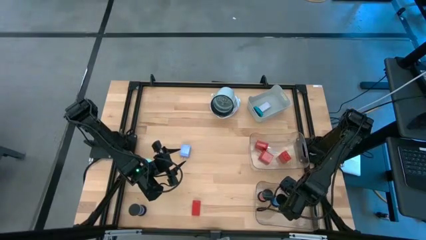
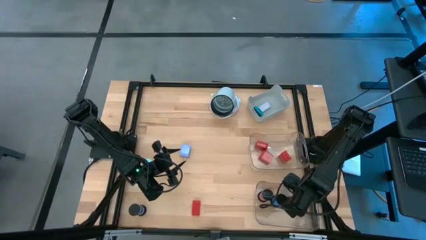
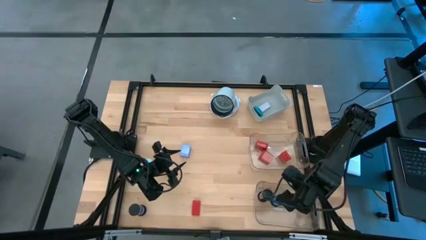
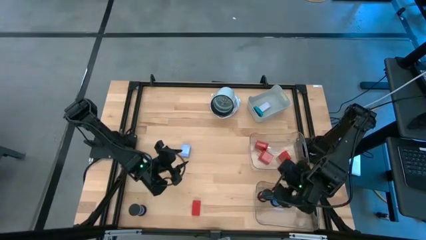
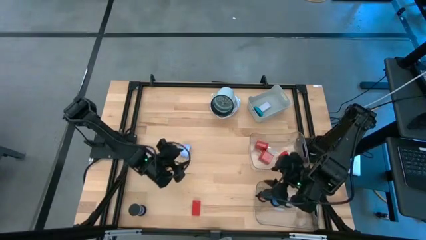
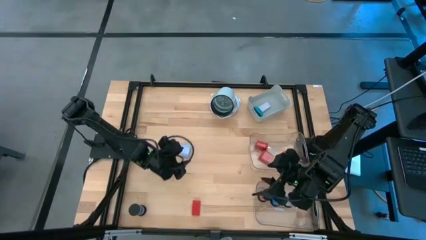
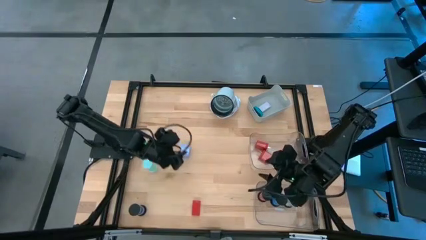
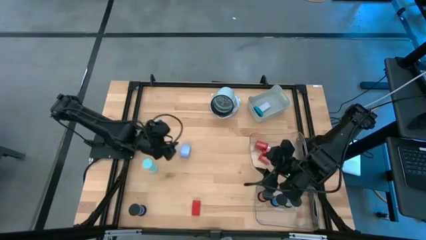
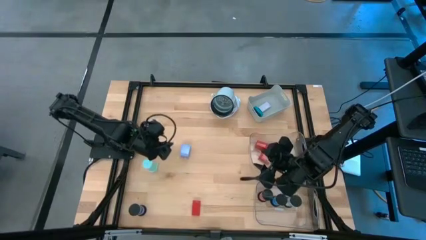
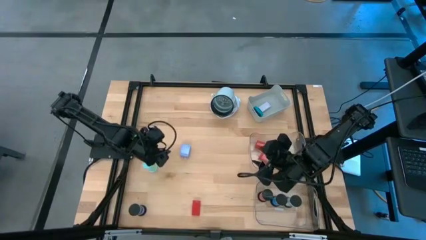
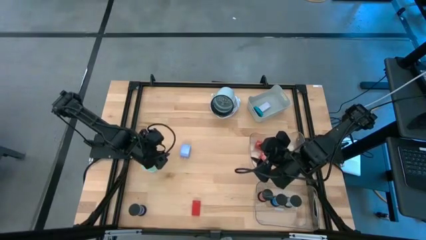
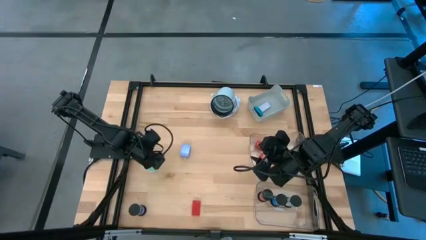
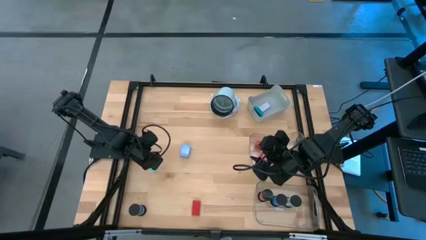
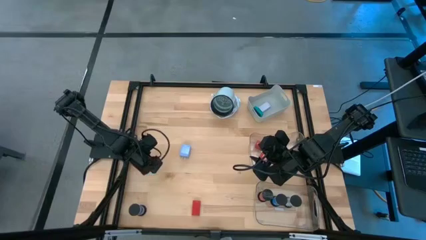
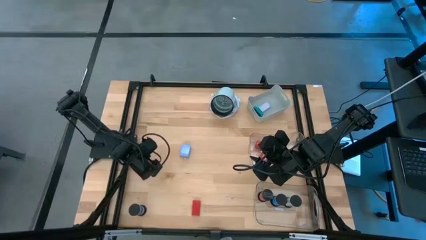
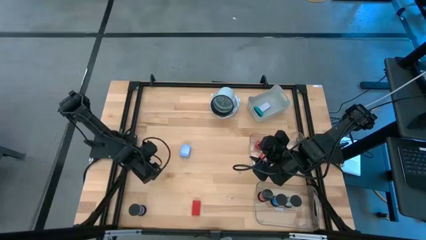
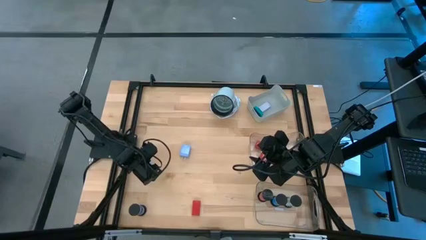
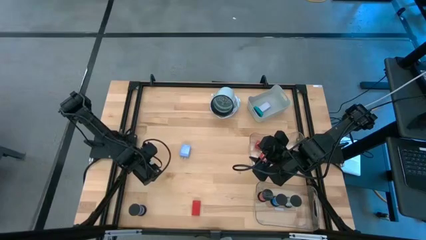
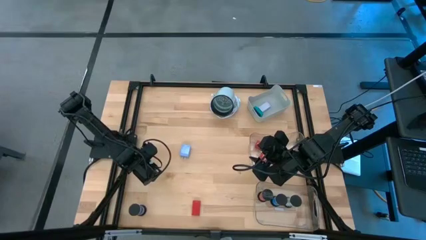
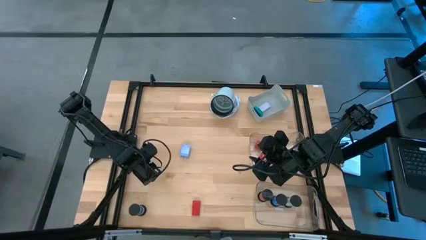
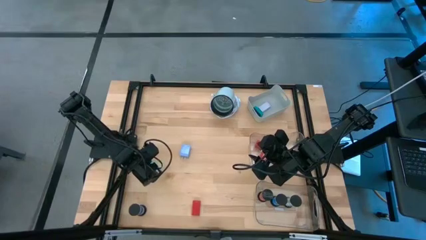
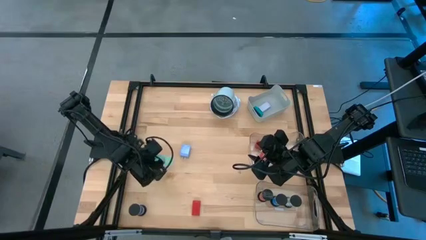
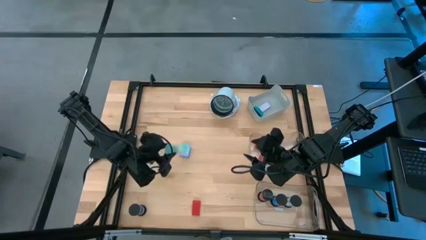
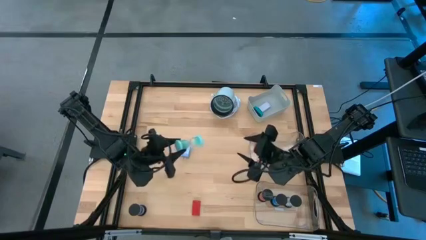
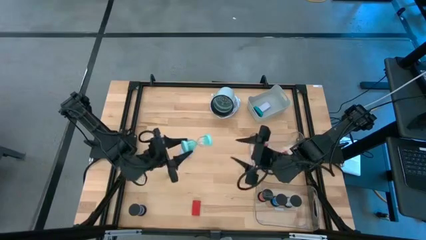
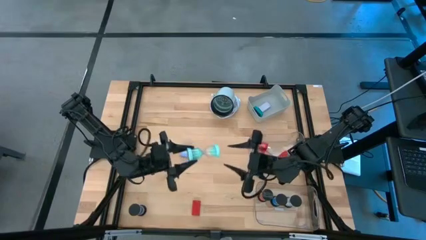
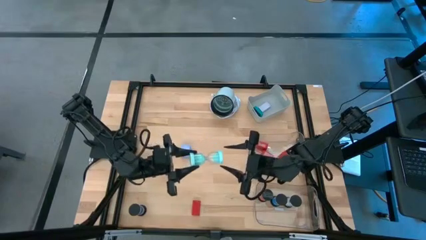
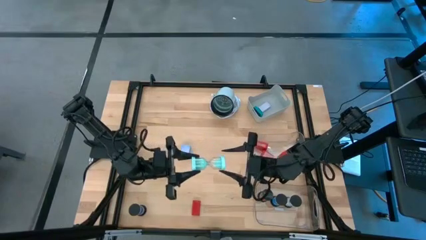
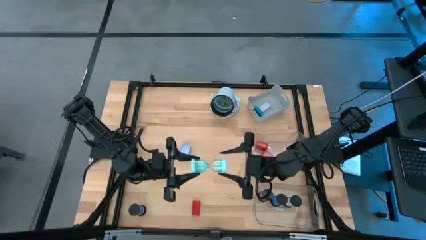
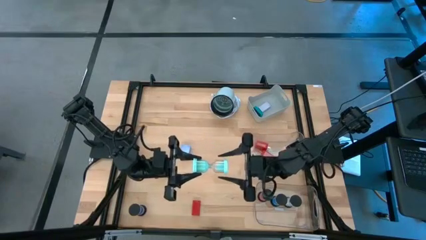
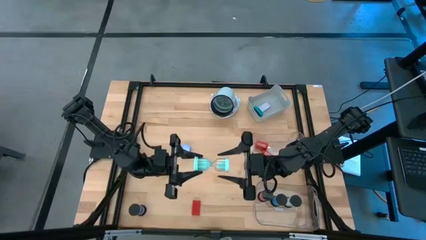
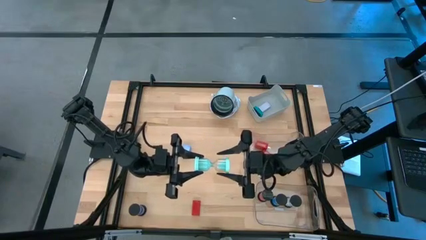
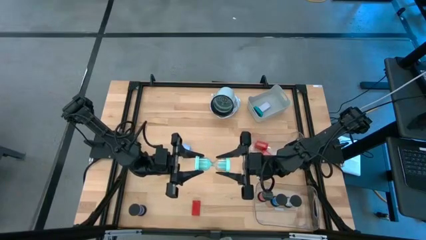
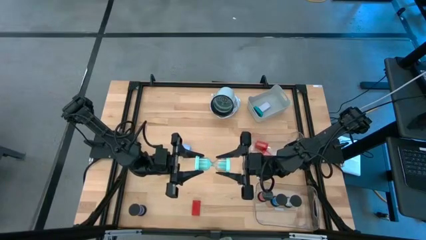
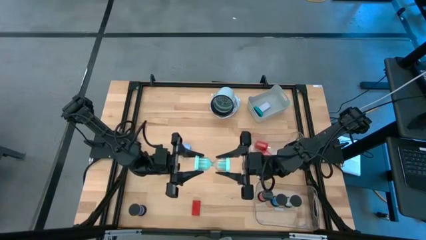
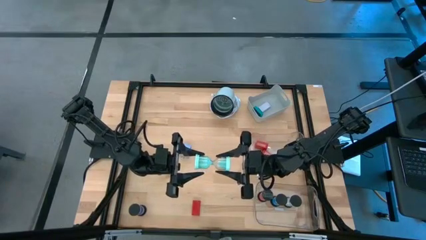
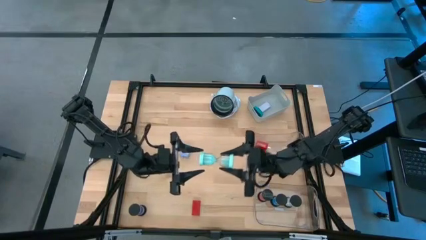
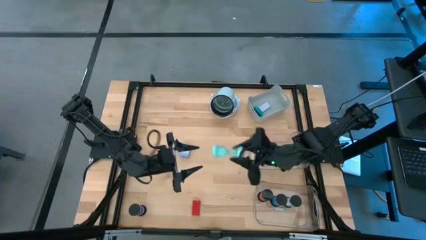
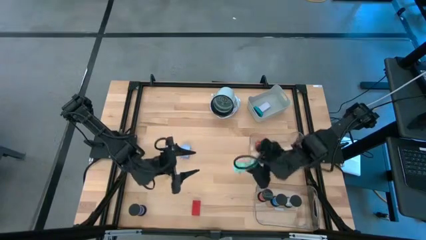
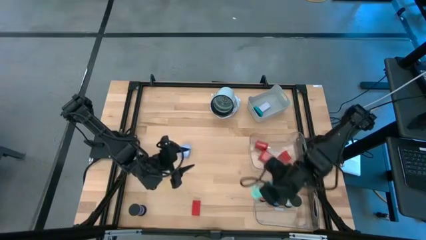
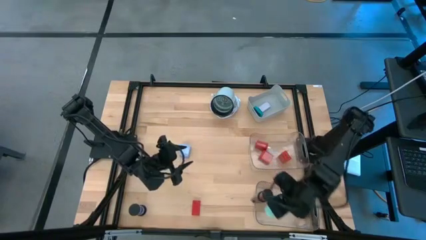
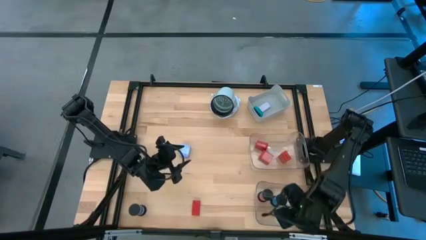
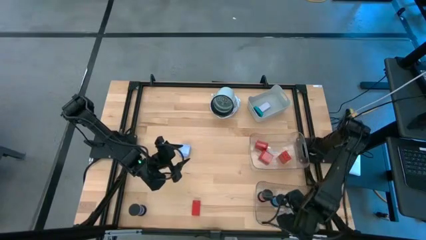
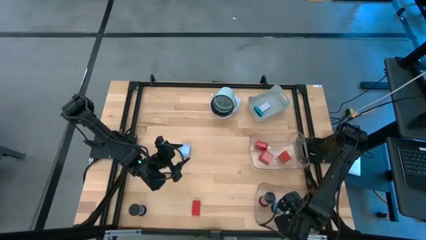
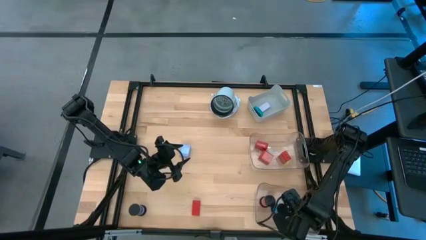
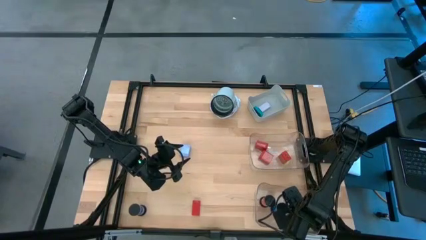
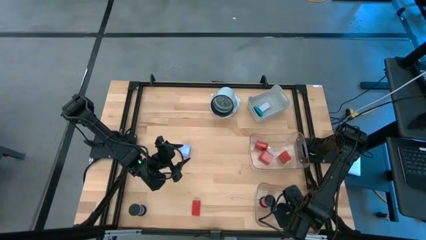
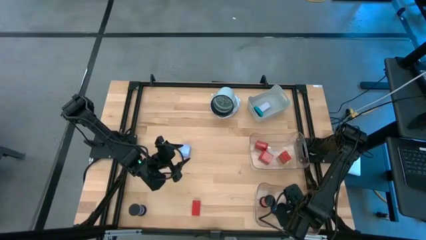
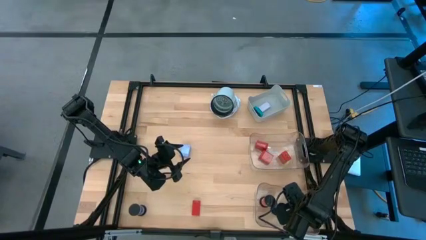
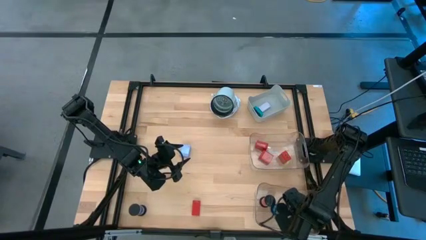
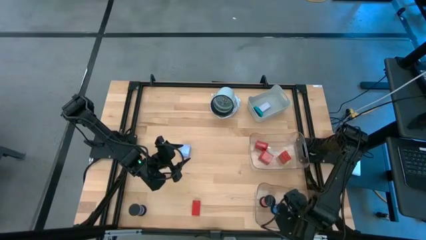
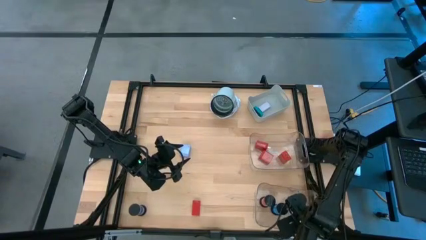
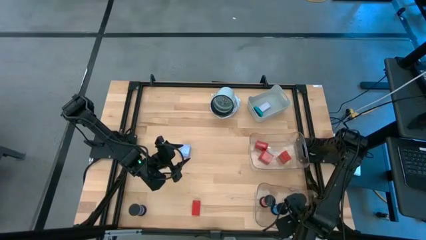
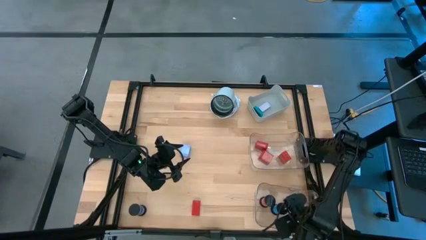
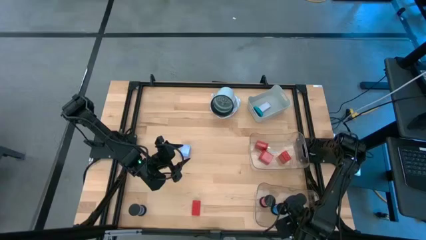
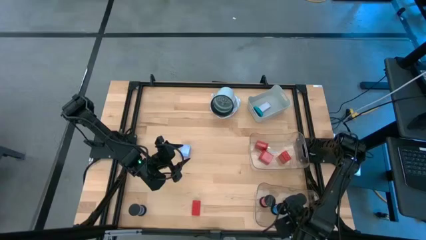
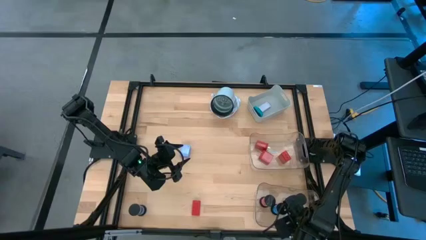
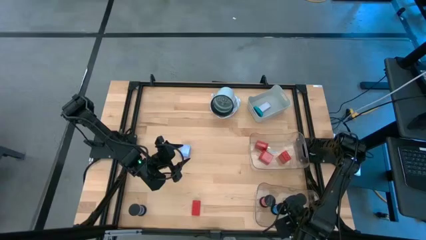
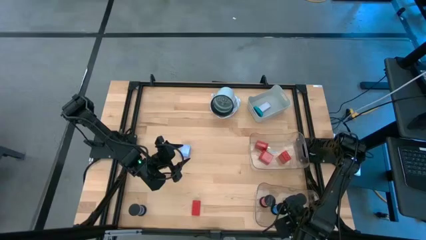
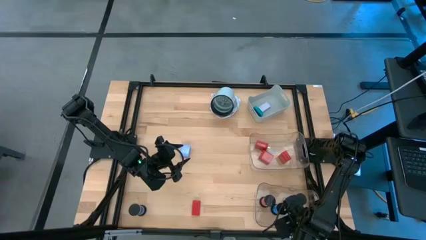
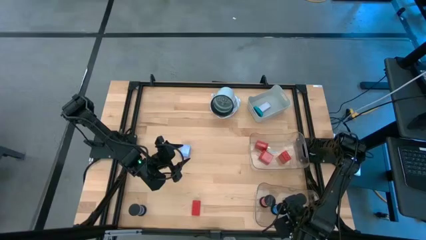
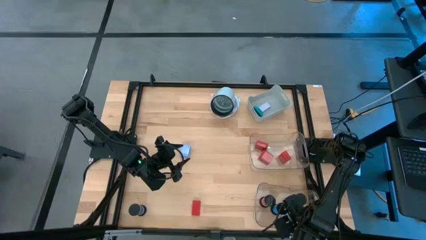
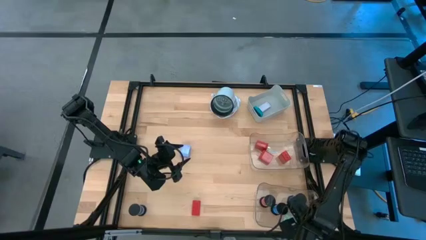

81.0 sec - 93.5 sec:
Task: Pick & Place Office items
Put the light blue hourglass into the bottom transparent bin
